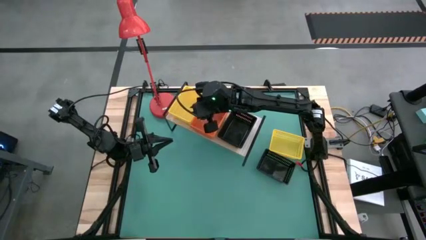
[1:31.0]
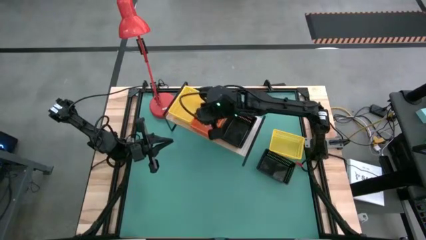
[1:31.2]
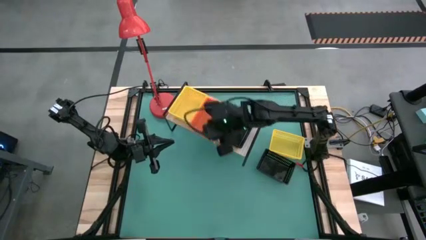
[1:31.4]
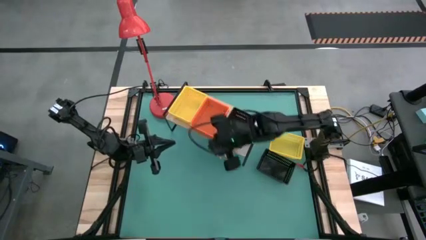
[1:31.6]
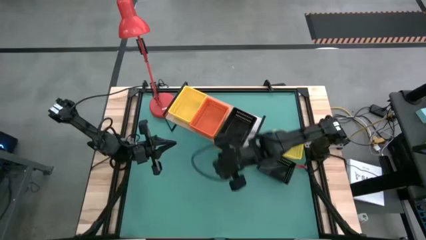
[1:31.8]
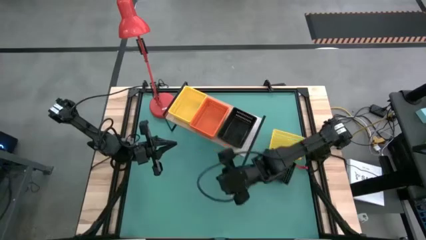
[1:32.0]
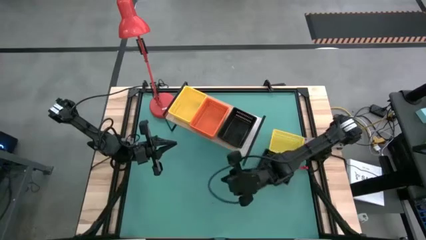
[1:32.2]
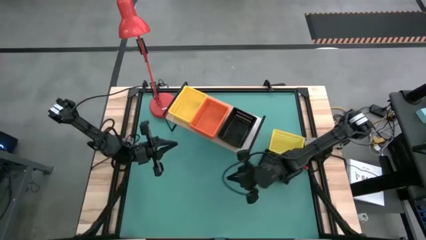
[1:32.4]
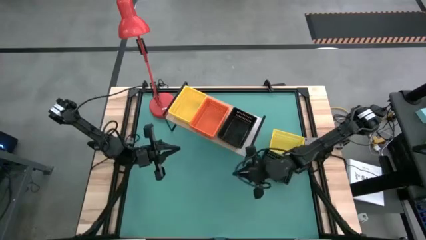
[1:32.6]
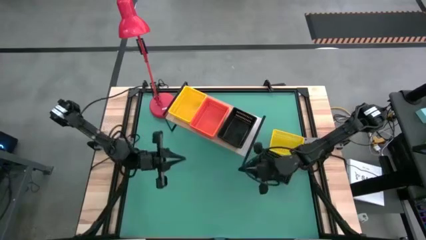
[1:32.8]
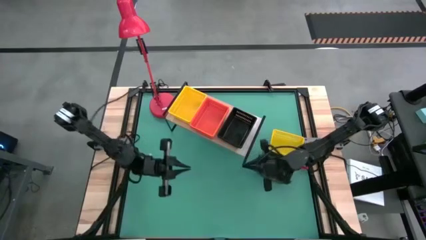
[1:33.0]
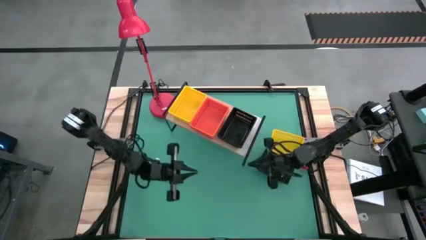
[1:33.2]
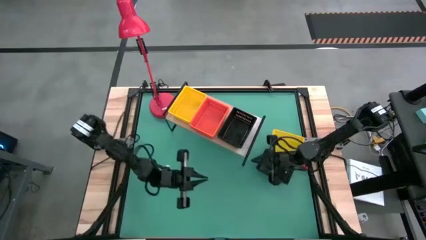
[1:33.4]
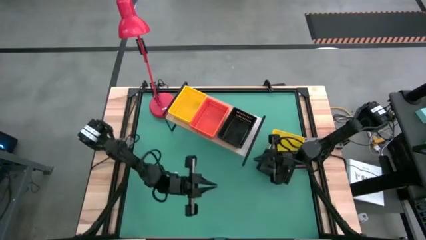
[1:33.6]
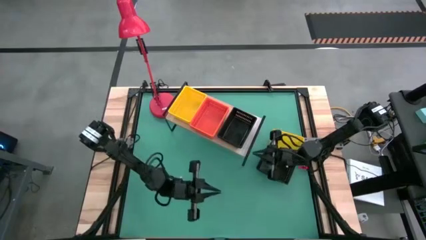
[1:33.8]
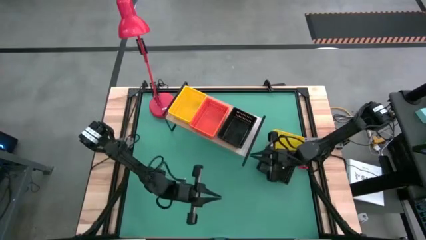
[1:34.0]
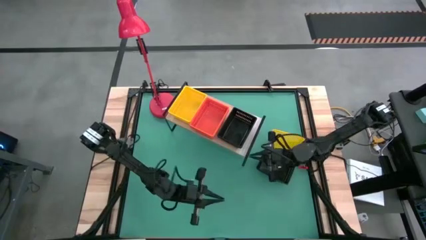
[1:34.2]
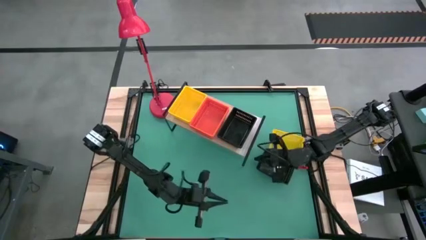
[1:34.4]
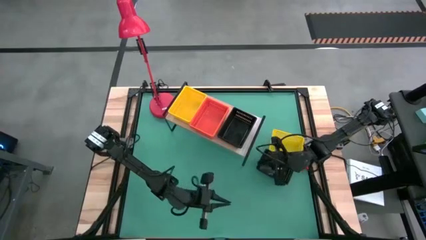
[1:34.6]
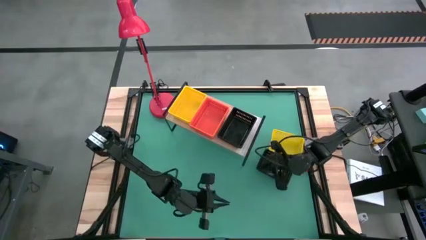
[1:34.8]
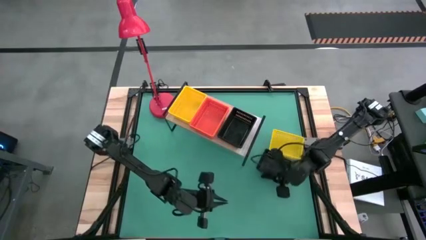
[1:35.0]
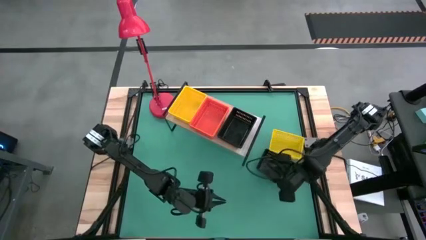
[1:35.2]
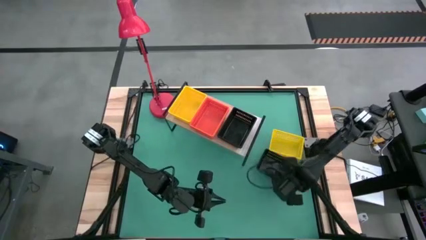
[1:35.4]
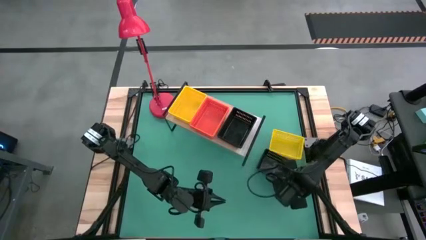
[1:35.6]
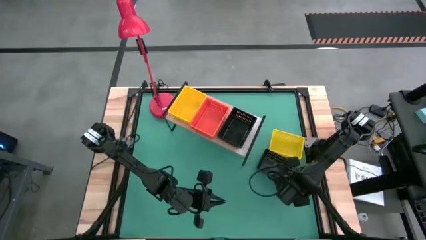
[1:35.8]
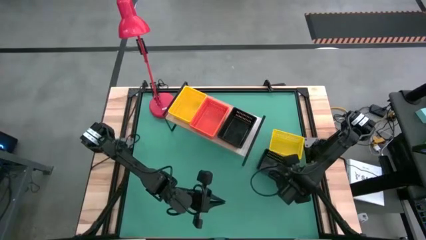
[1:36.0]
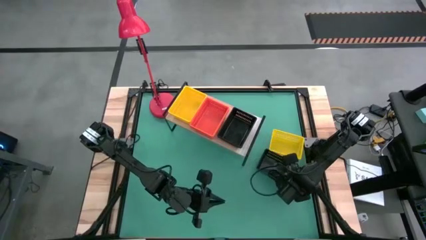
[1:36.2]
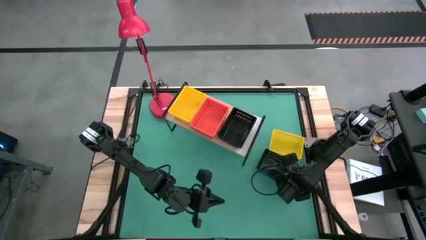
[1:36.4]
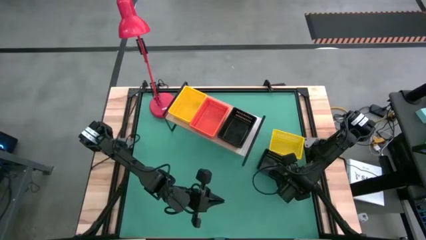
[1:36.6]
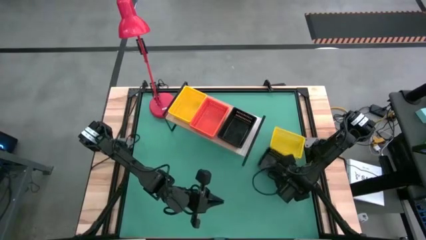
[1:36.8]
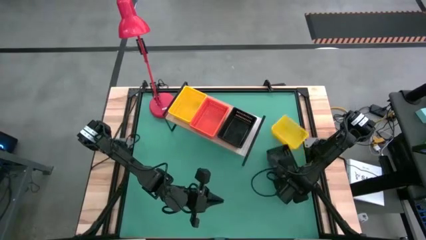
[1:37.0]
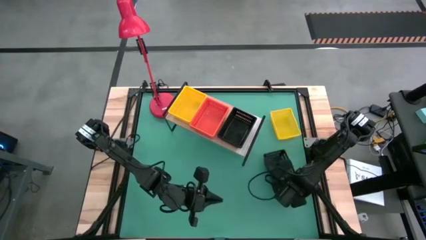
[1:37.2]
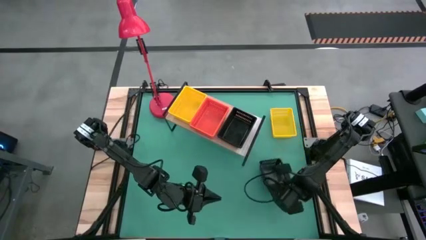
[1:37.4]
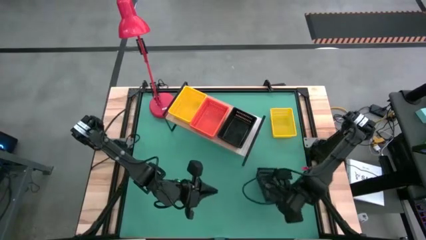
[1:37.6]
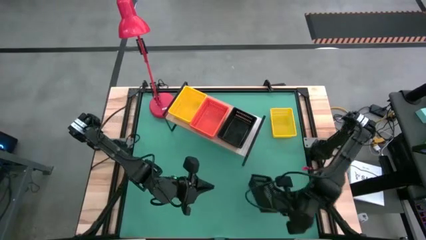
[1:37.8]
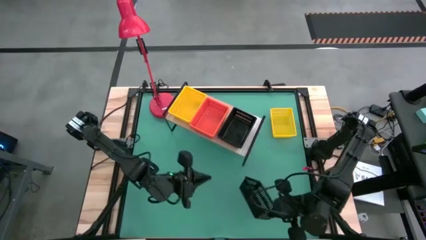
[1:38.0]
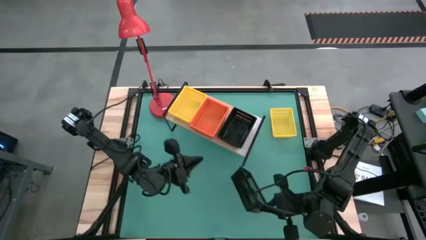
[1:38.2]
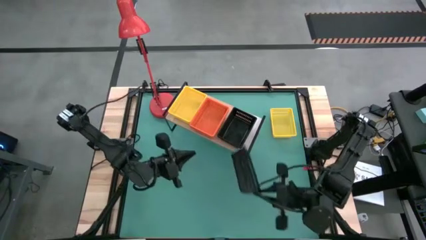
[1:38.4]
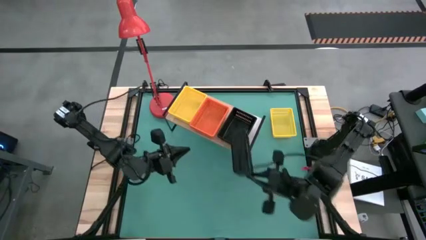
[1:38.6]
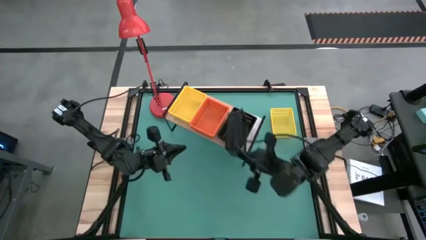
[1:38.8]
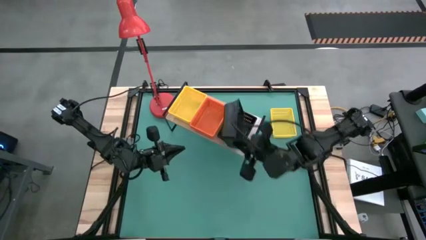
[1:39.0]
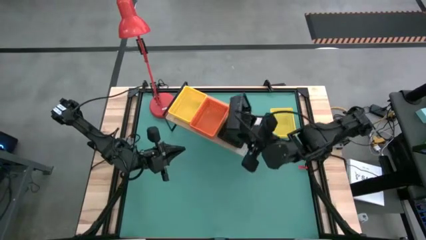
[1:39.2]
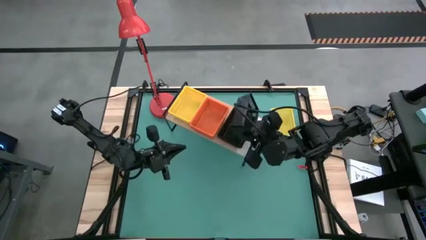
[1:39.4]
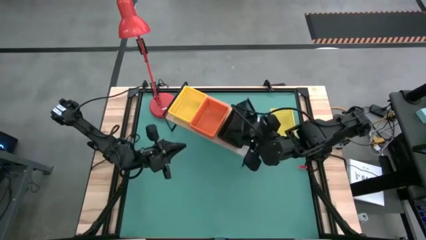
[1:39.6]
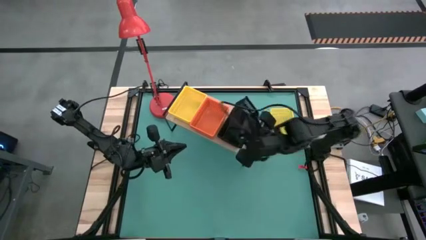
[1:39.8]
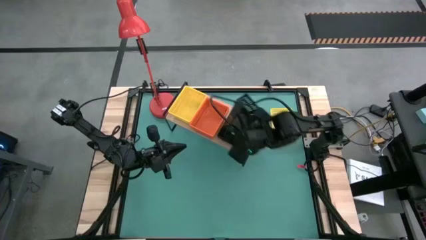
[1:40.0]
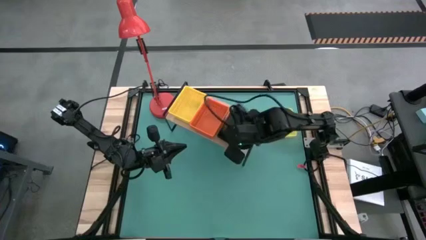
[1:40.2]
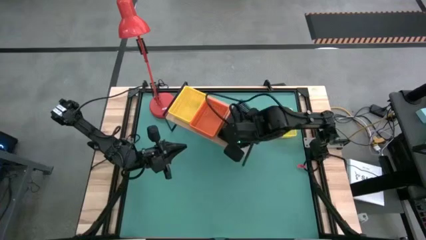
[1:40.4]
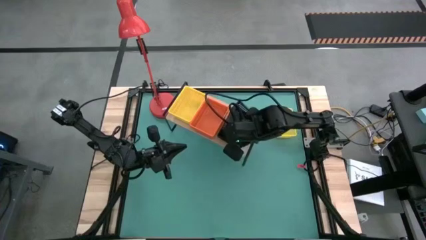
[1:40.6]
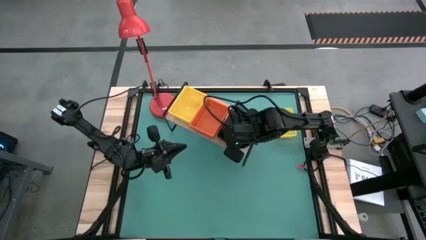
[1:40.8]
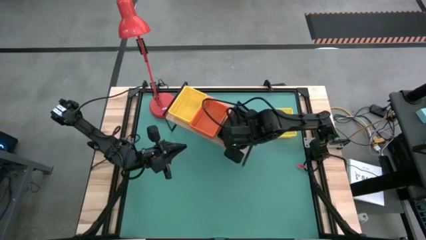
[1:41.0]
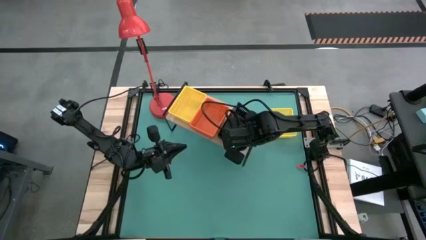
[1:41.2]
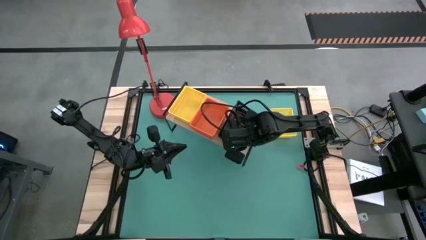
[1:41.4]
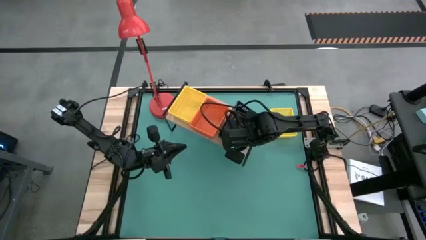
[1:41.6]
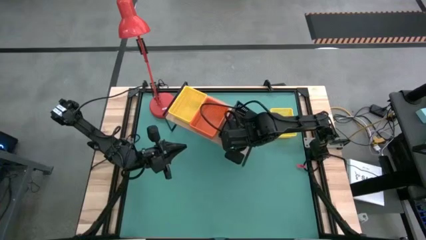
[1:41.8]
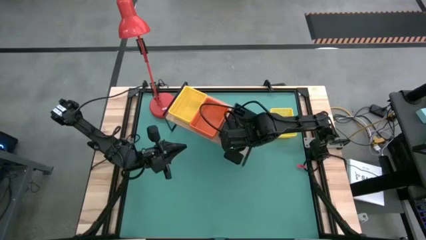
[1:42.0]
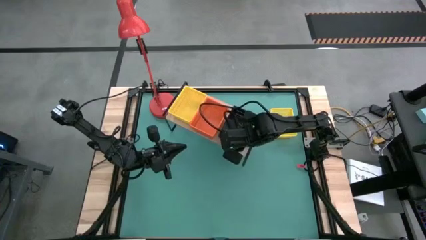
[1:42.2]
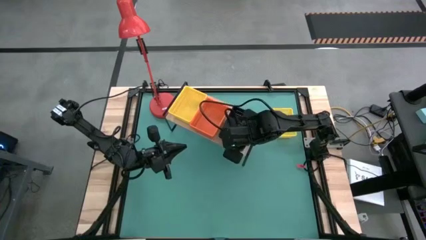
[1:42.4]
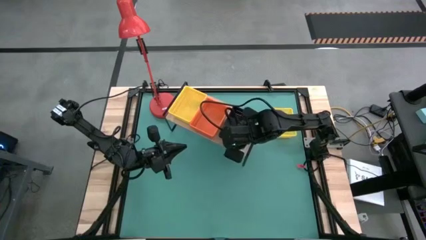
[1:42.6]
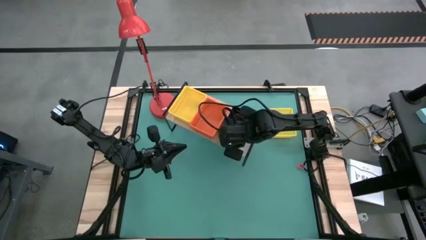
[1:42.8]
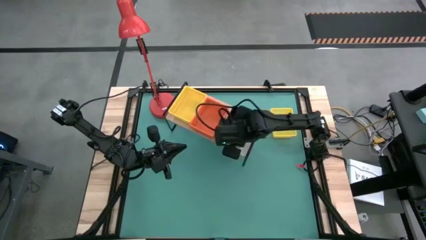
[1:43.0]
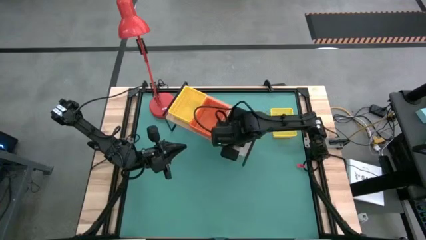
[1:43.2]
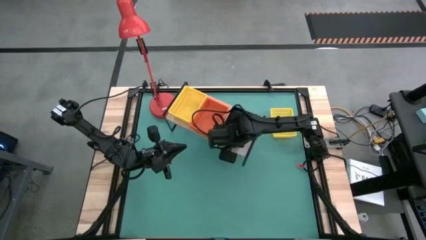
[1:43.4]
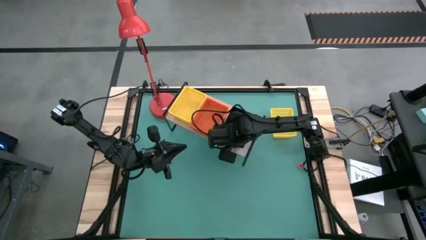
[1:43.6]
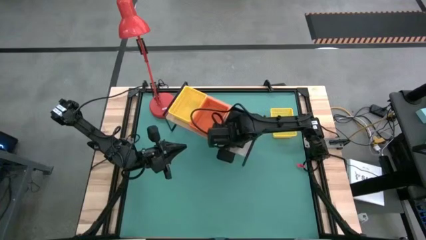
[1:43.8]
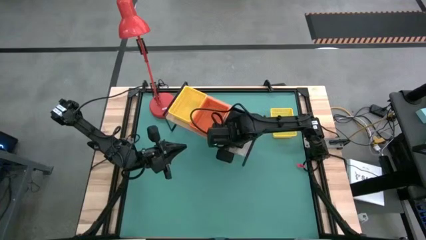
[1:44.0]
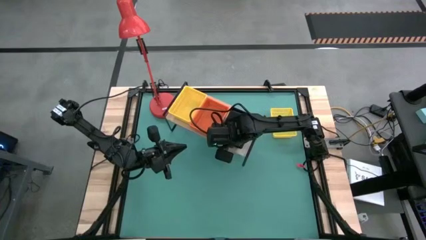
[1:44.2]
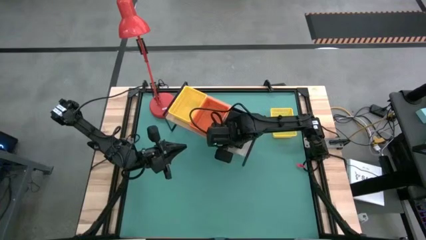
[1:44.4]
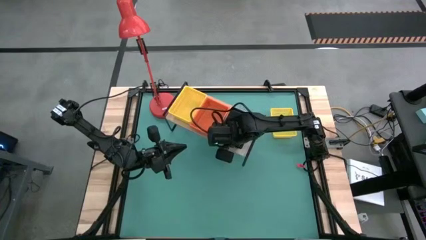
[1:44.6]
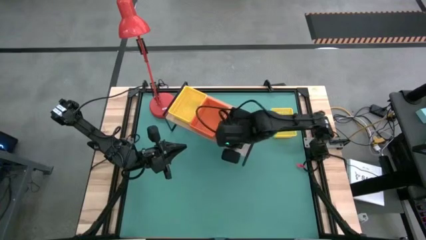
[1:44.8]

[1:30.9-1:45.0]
Task: Stack baskets on shelf by color
Stack the black bin on top of the other black bins on the shelf

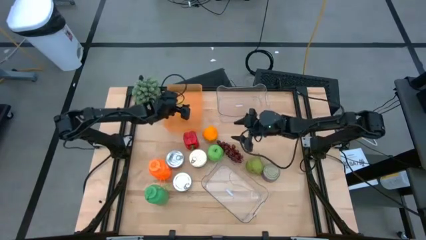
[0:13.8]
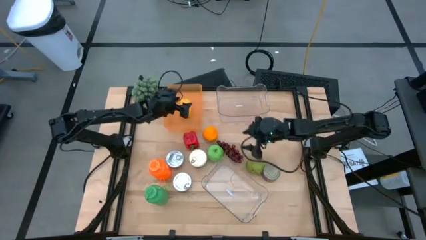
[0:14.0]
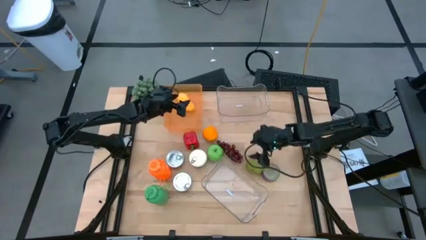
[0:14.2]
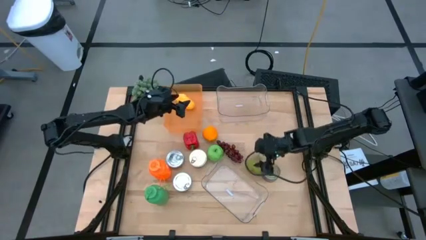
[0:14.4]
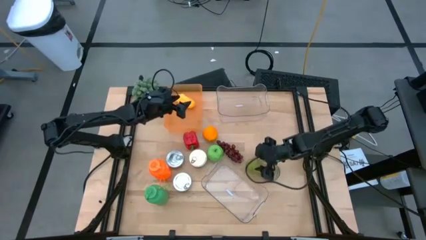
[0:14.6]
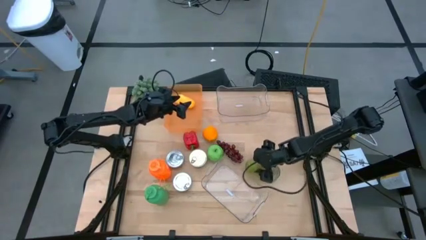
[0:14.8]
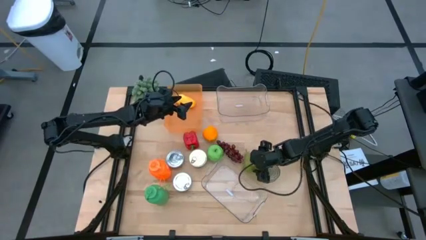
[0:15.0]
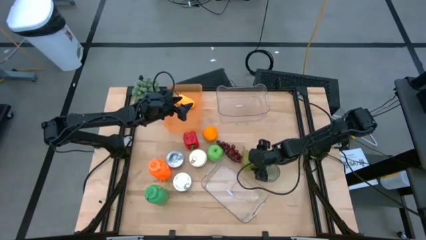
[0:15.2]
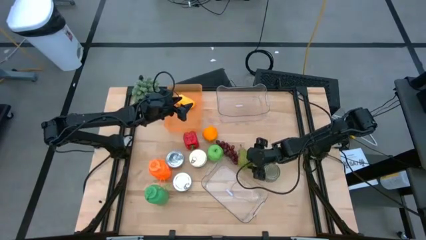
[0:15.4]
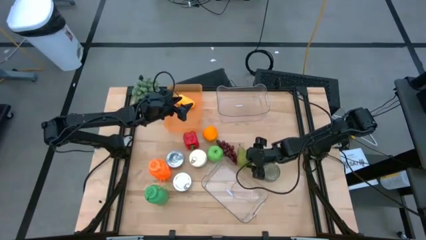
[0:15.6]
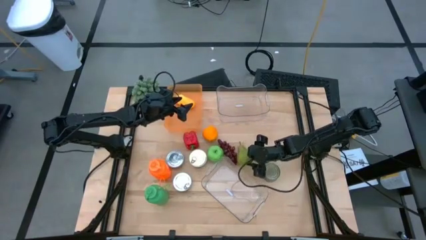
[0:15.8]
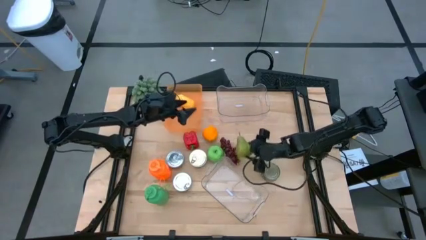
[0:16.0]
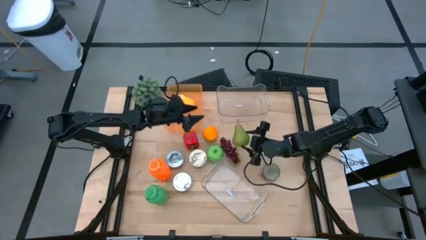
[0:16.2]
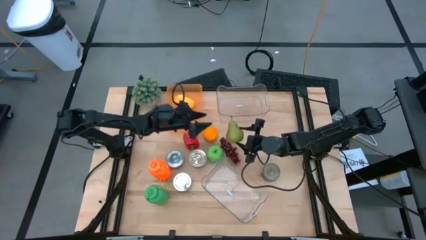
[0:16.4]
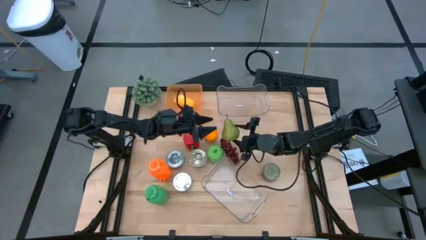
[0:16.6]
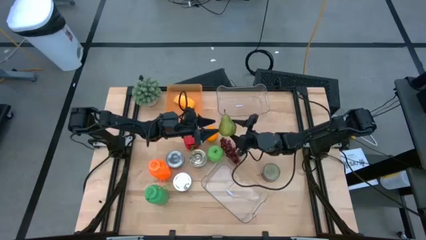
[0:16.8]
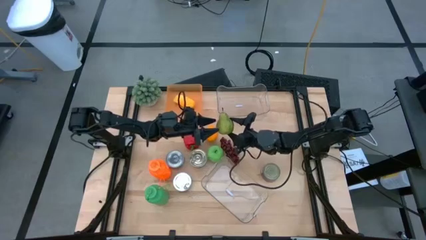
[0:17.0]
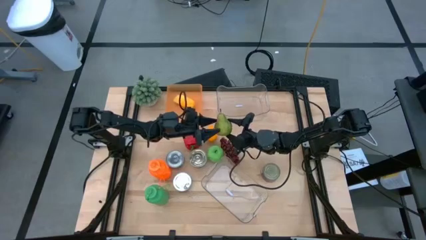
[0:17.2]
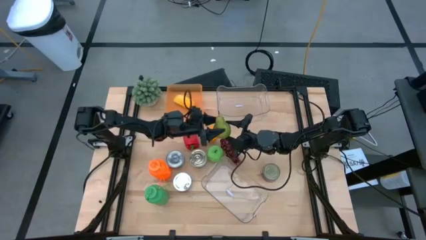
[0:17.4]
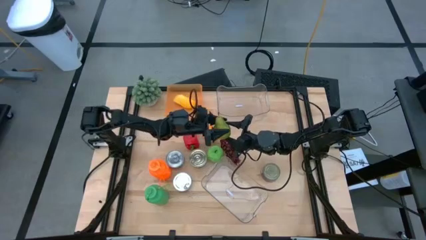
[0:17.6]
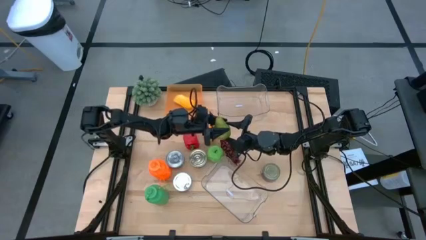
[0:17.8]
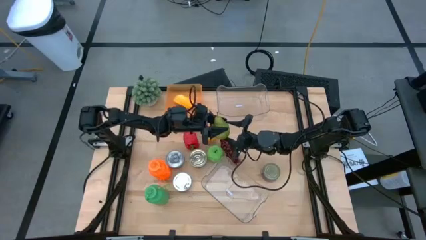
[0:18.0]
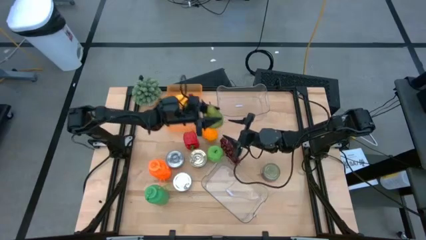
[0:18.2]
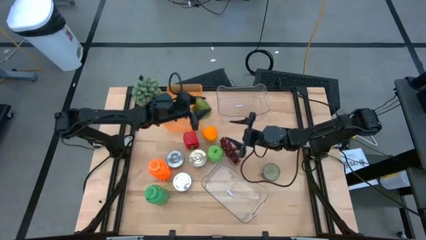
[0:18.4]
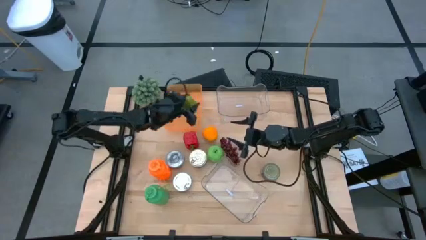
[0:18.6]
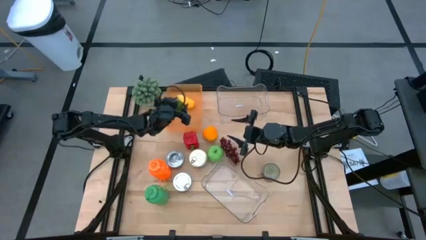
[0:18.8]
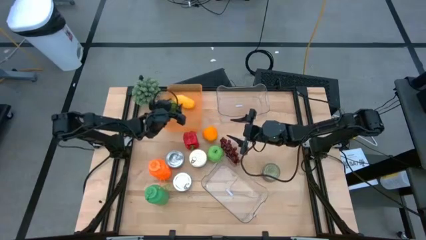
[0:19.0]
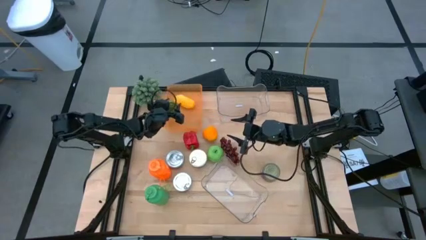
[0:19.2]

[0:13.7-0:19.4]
Task: Pick & Place Food Item
Put the pear into the orange bin
